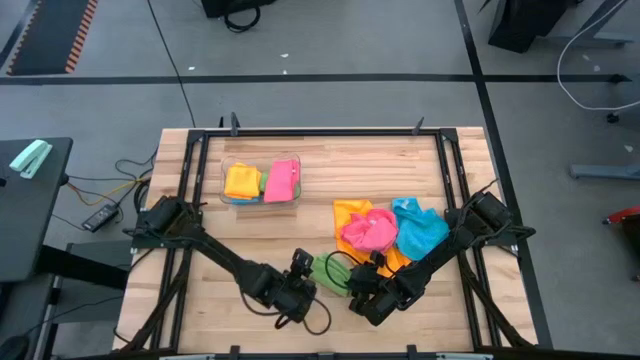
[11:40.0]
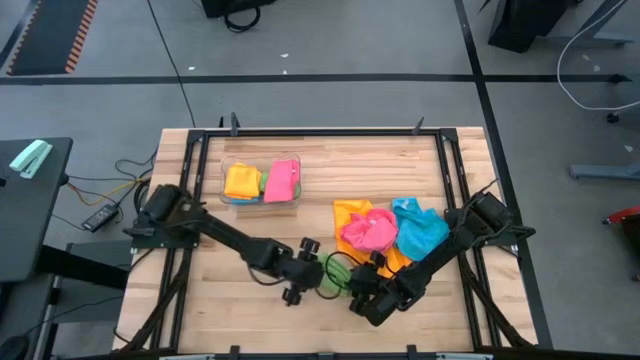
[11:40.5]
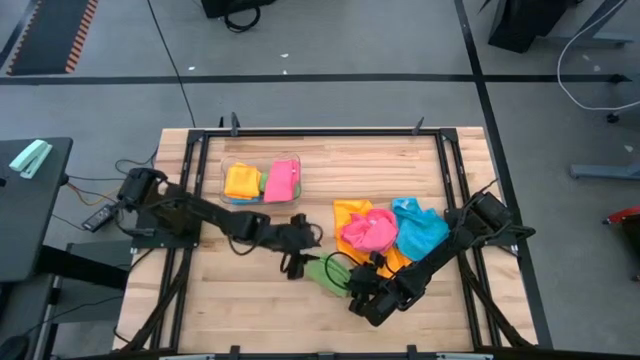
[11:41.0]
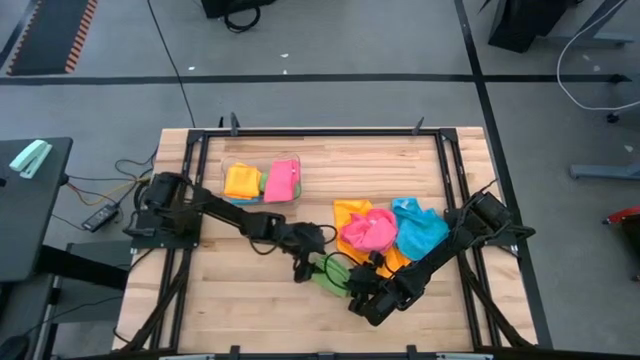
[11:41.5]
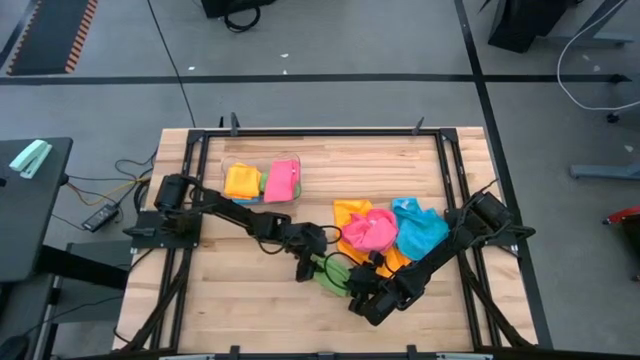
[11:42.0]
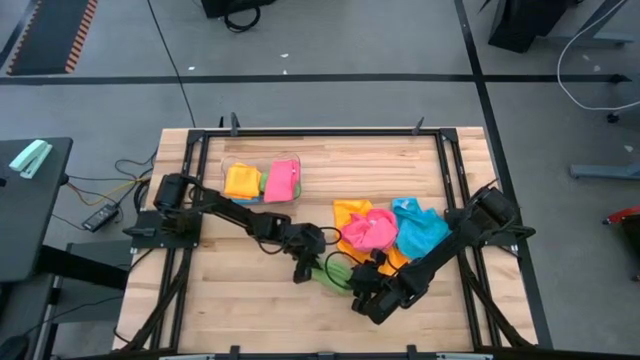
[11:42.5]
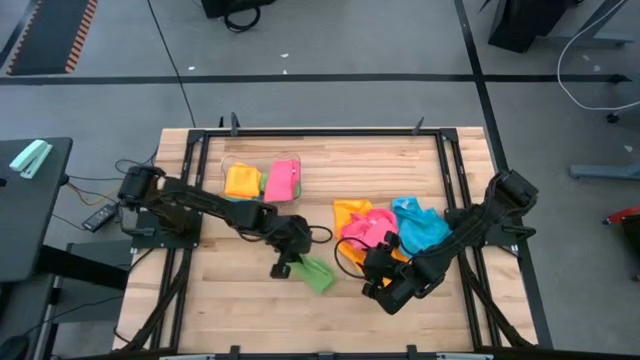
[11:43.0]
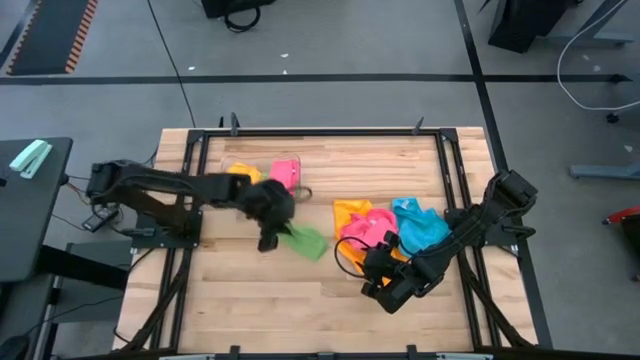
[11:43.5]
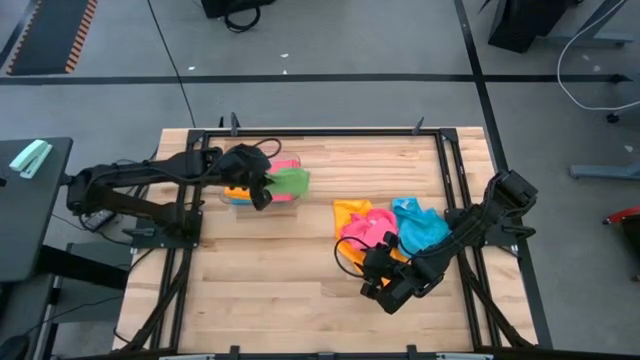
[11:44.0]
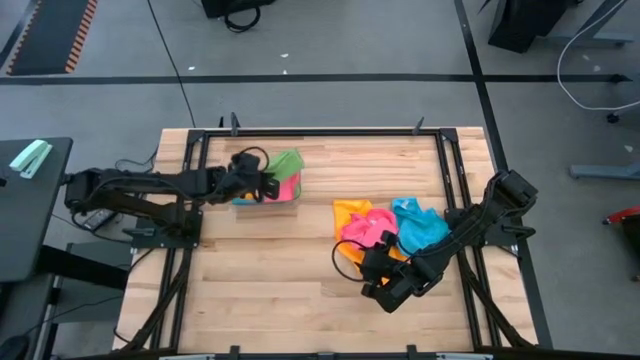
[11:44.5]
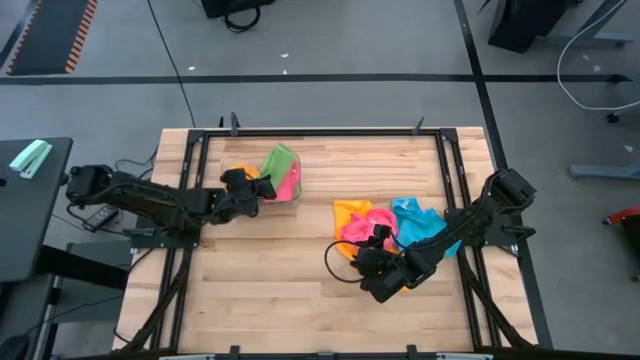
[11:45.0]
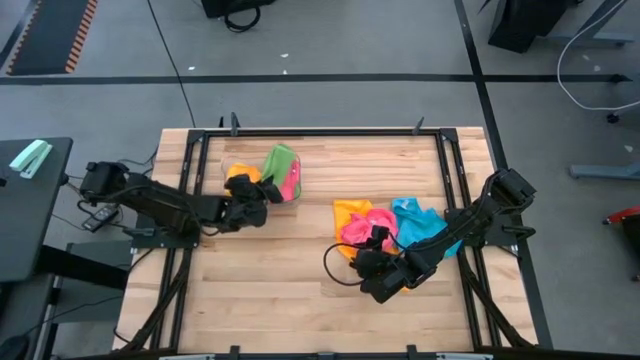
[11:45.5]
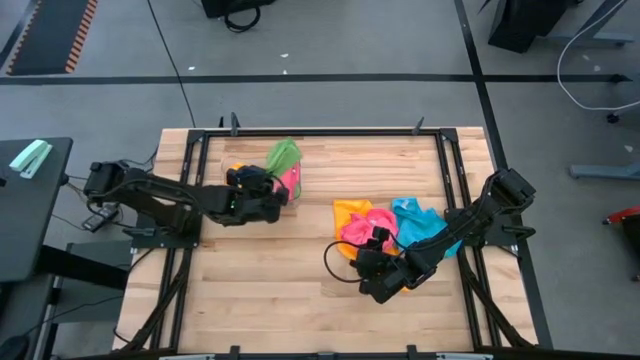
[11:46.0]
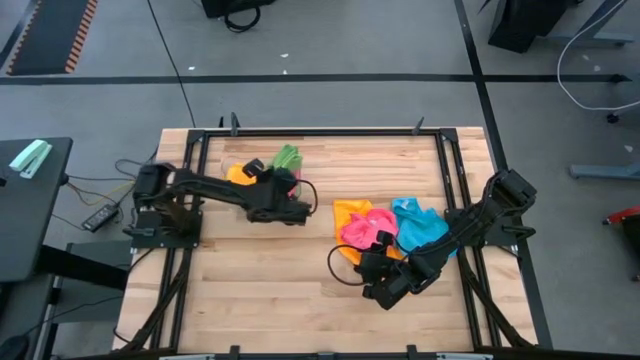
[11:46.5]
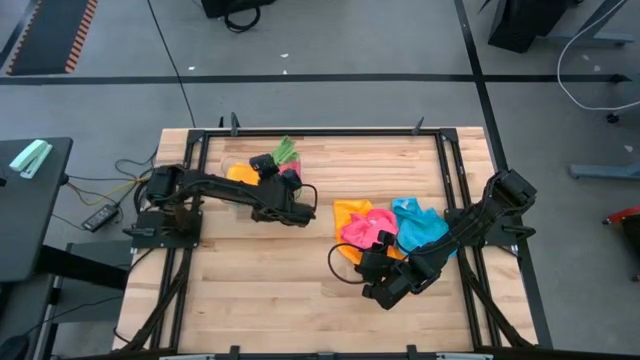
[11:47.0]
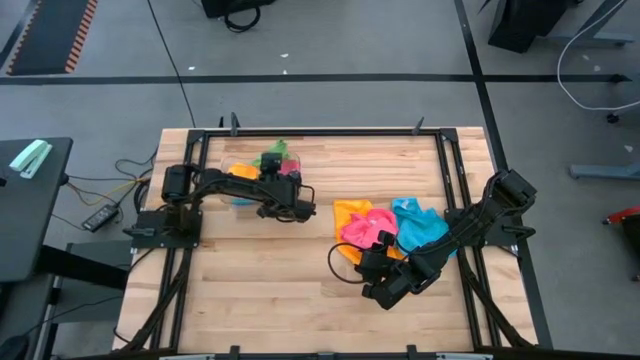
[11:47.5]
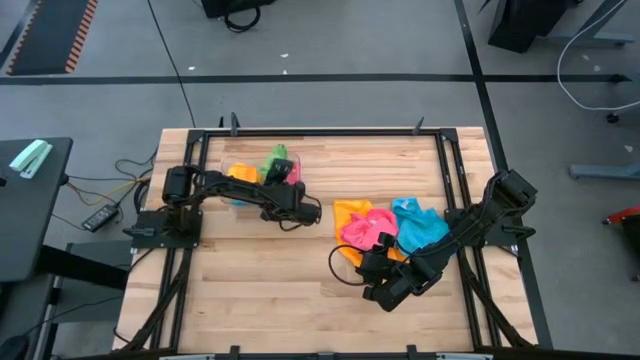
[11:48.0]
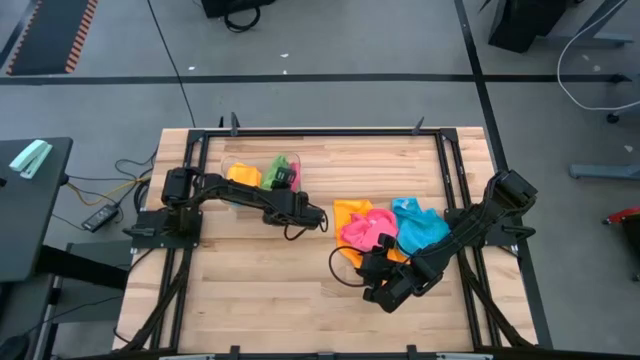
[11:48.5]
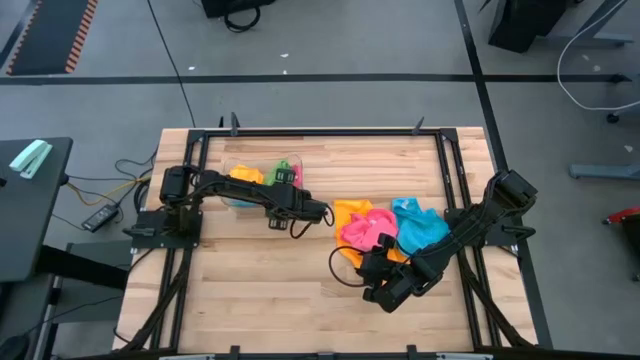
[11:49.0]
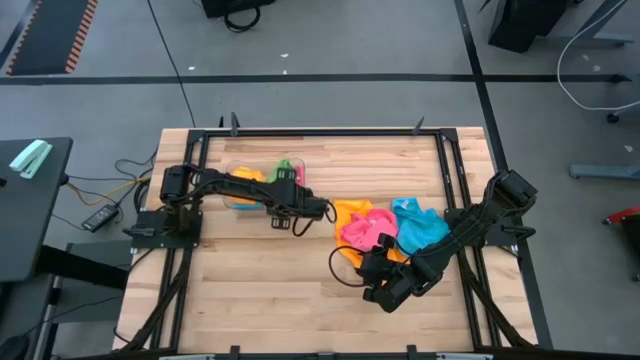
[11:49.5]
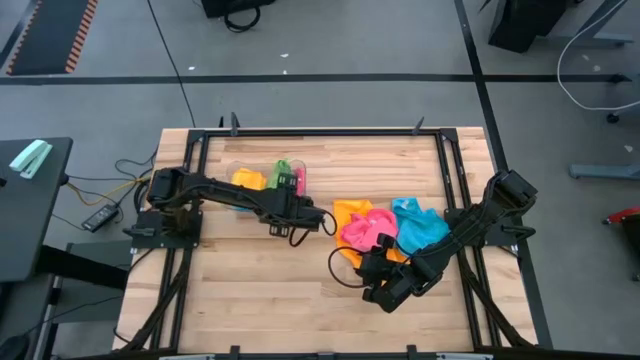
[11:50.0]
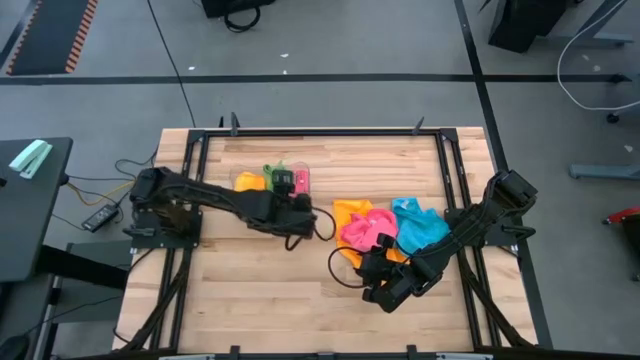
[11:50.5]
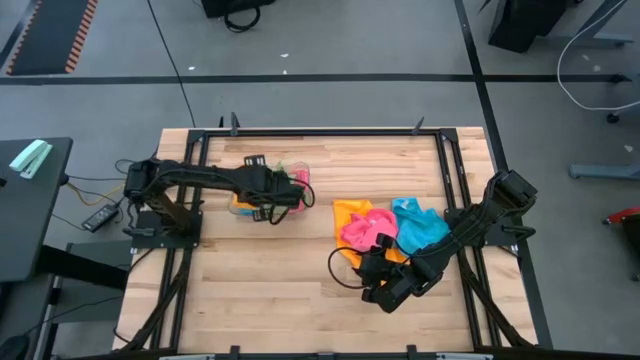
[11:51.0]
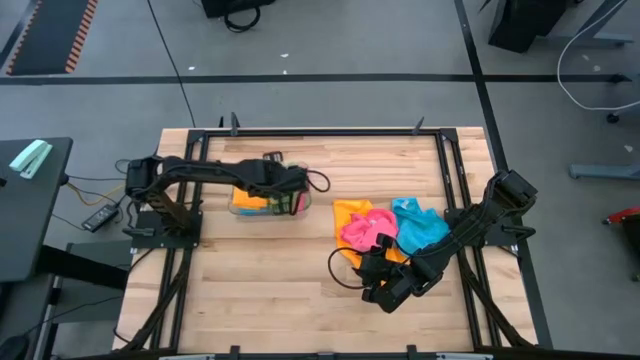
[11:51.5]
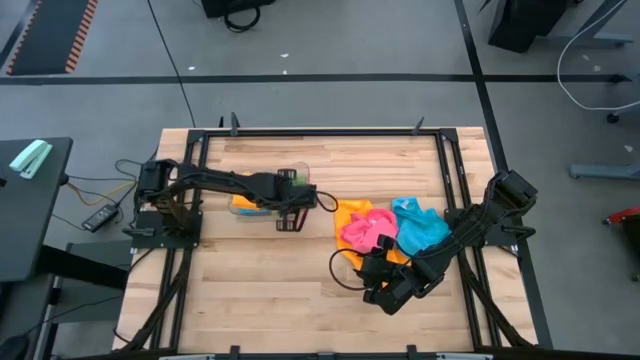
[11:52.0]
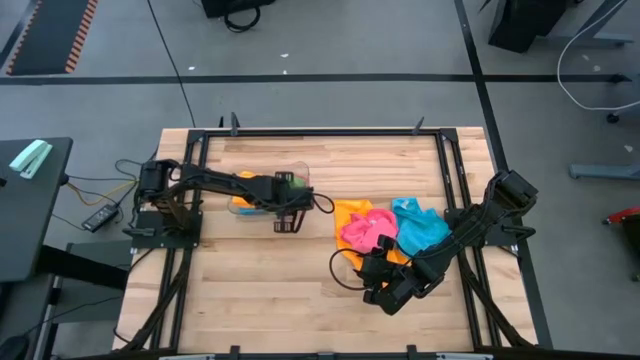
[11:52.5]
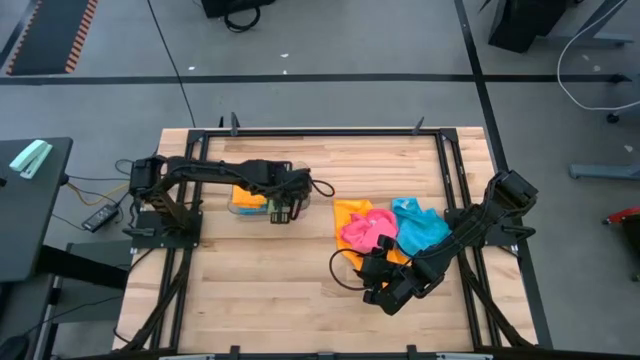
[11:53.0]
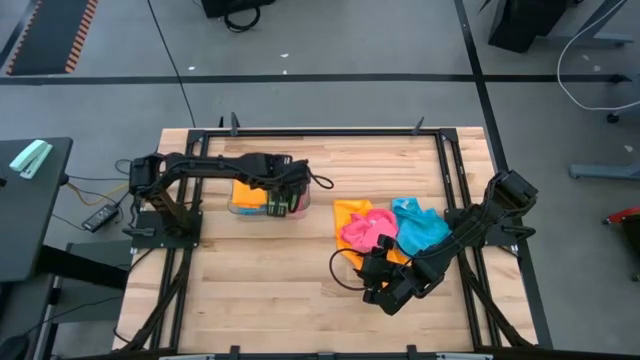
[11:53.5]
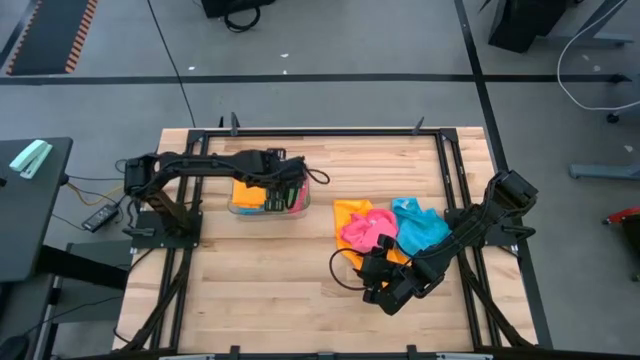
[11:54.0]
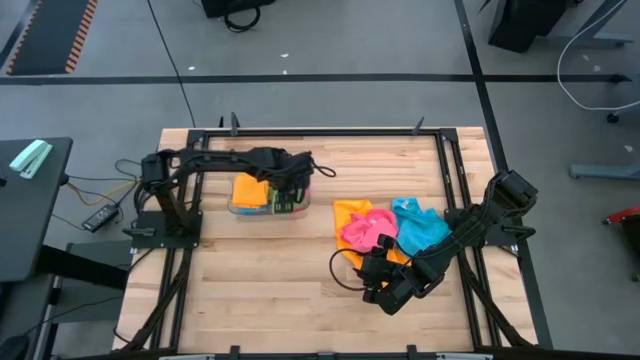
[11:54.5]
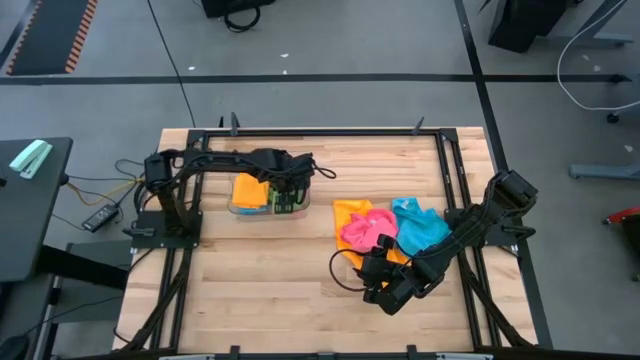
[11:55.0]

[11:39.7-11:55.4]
Task: Fold microfiber towels
Stack the green microfiber towel on top of the pink microfiber towel

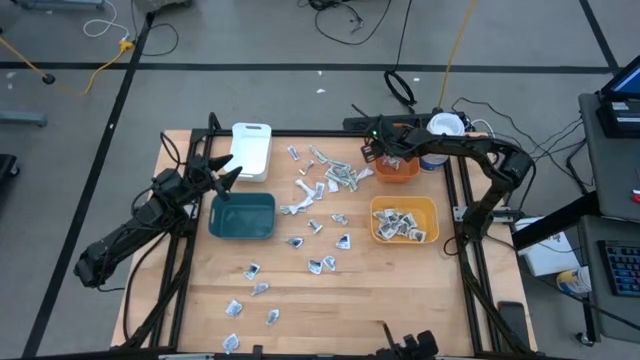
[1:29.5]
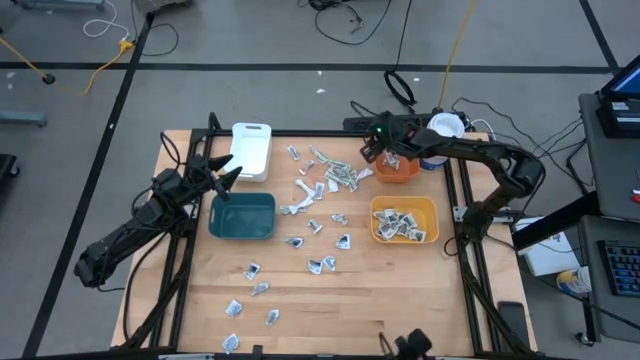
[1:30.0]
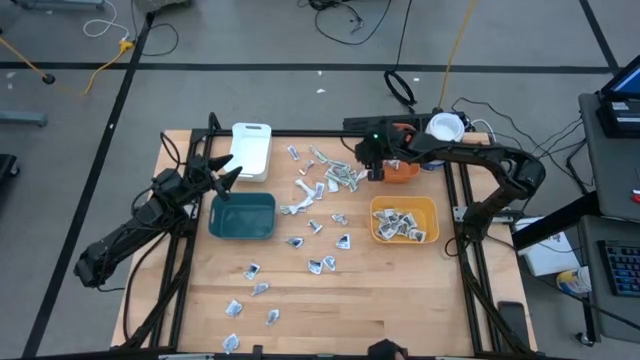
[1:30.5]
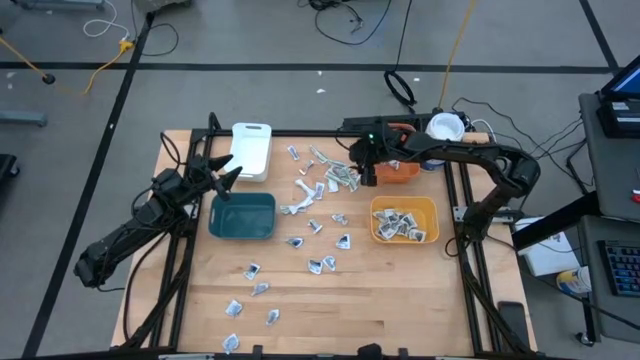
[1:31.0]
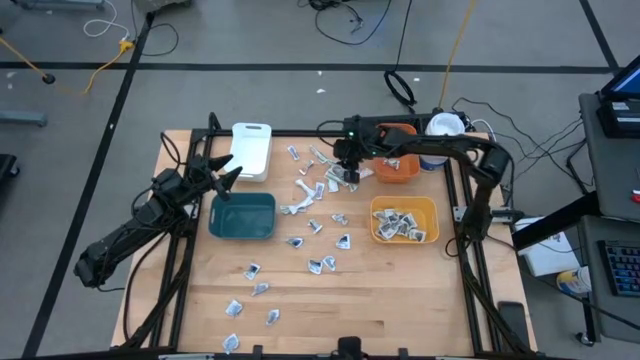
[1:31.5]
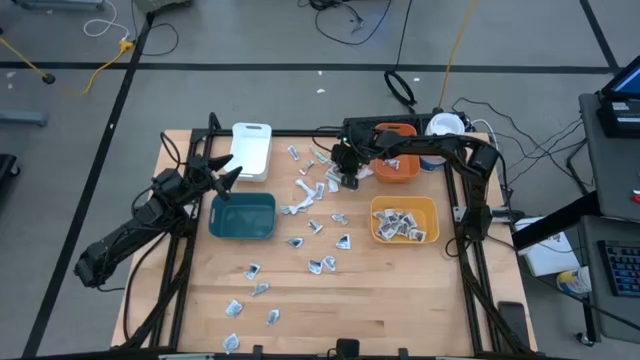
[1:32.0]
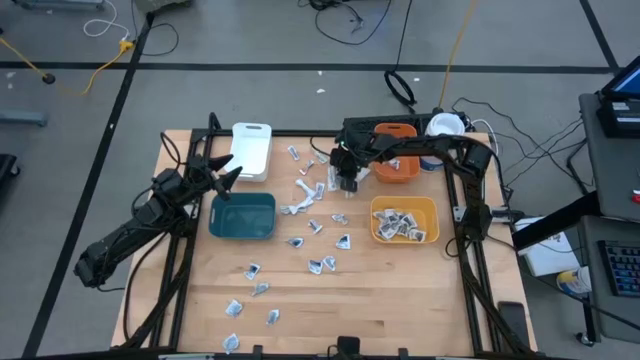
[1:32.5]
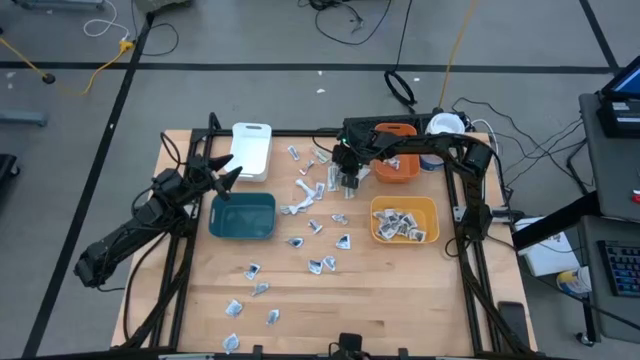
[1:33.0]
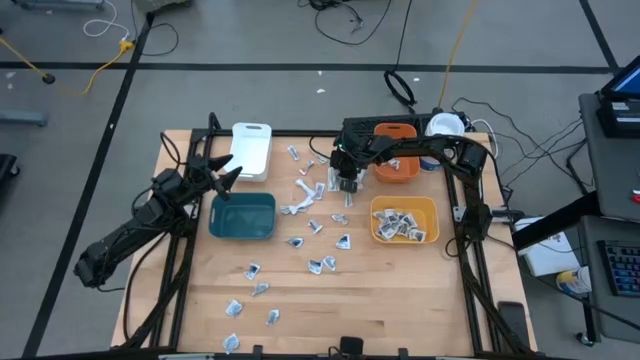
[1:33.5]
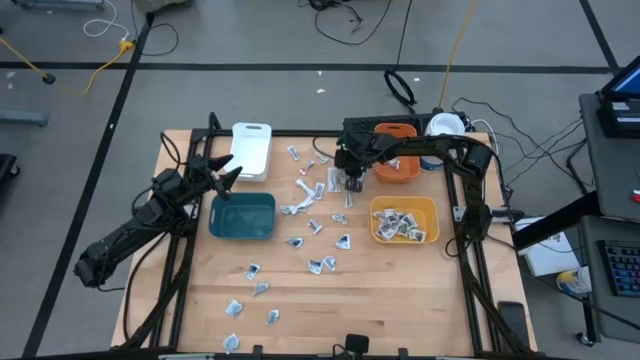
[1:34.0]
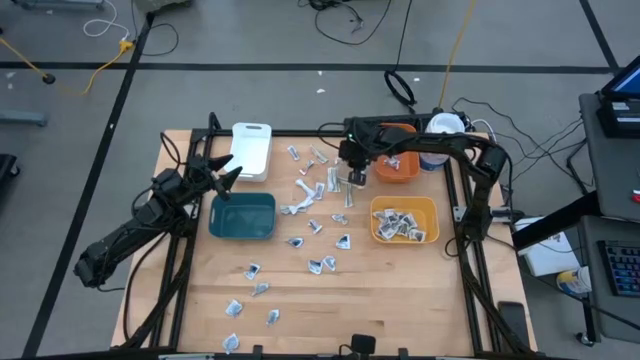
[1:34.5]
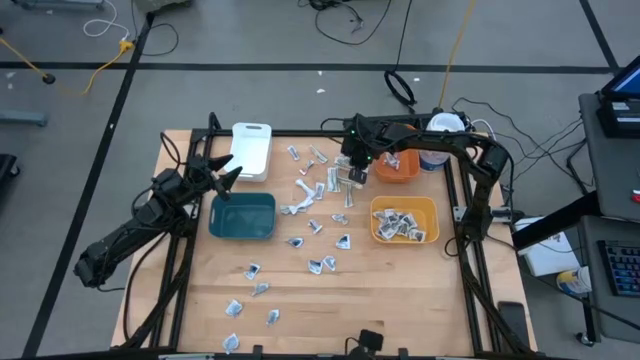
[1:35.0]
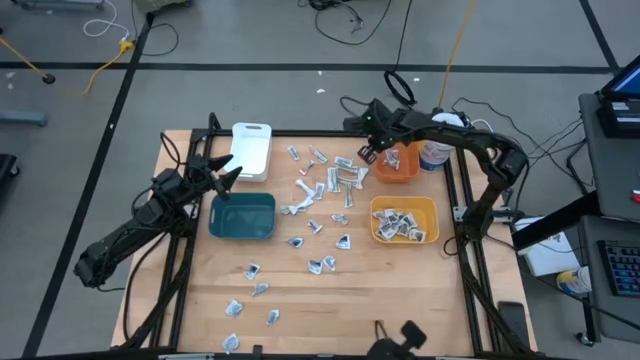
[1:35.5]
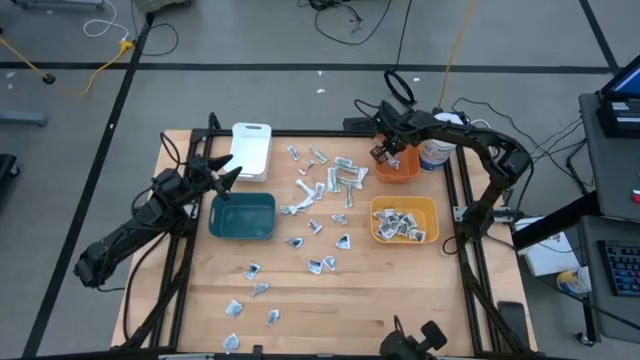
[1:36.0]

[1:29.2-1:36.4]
Task: Pick & Place First Aid Supplies
Put the antibiotic ointment into the orange bin
